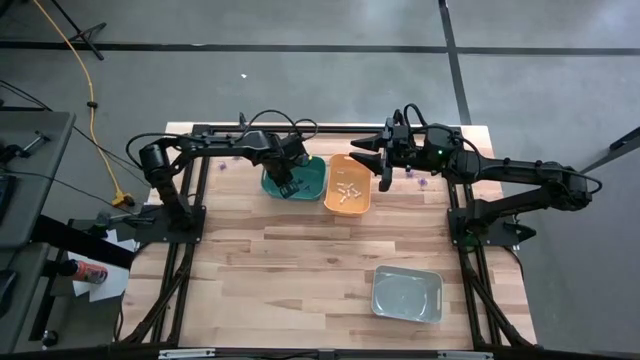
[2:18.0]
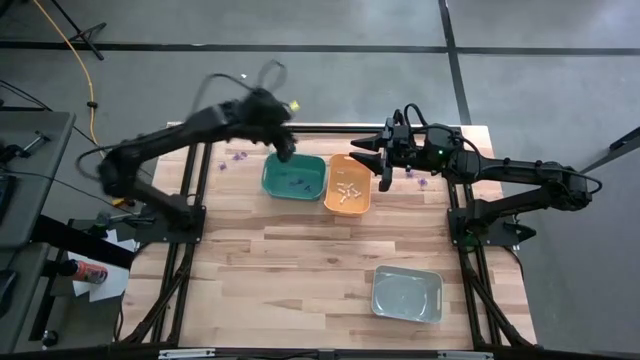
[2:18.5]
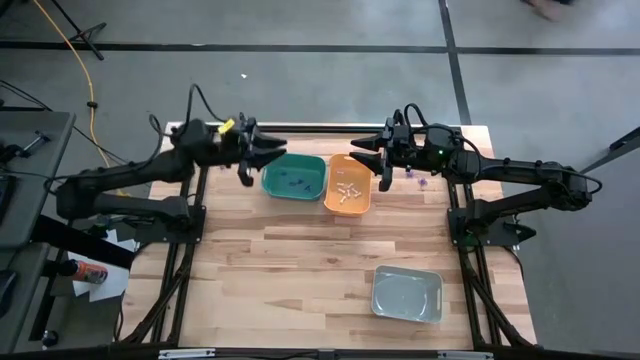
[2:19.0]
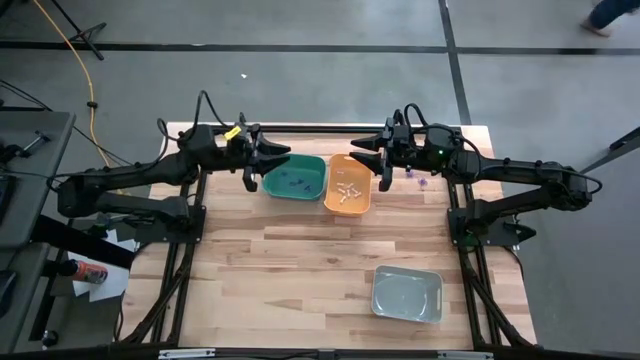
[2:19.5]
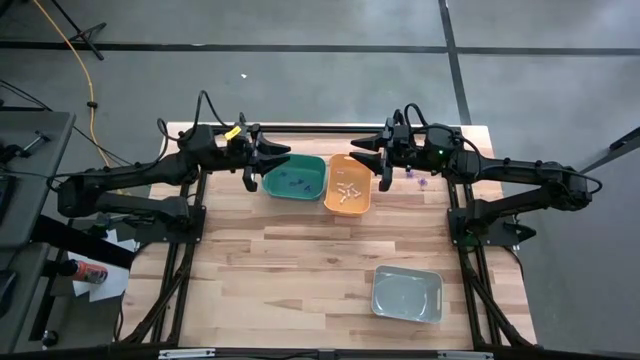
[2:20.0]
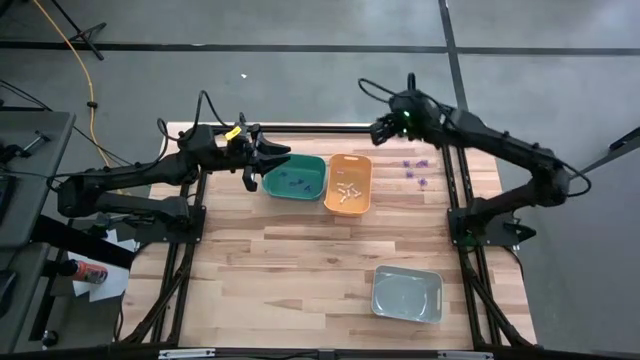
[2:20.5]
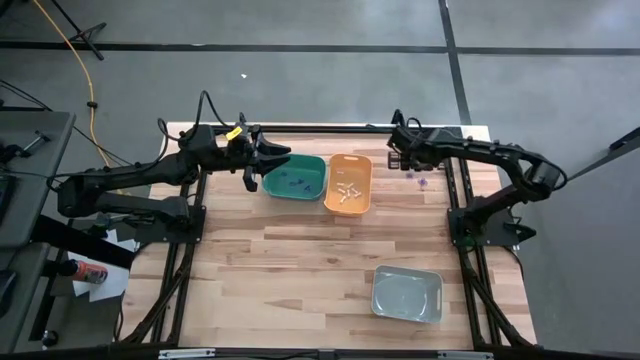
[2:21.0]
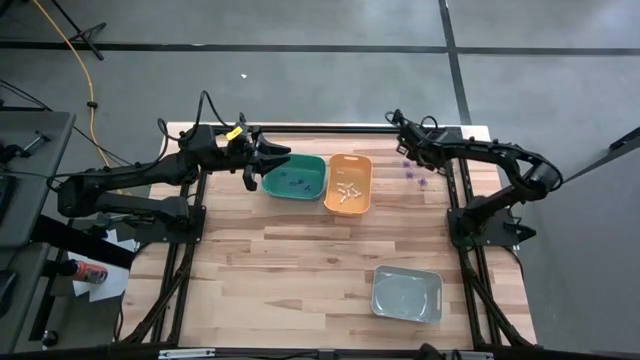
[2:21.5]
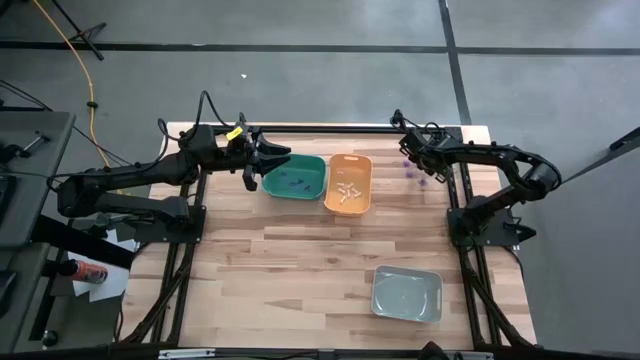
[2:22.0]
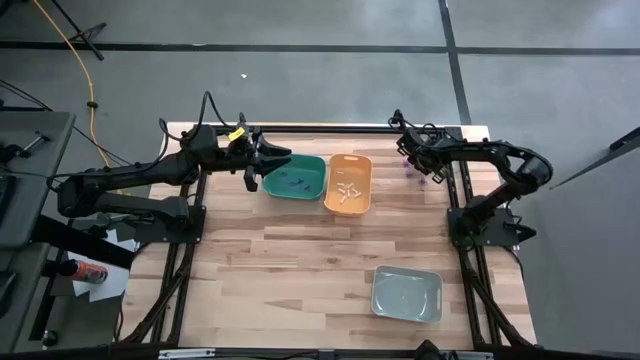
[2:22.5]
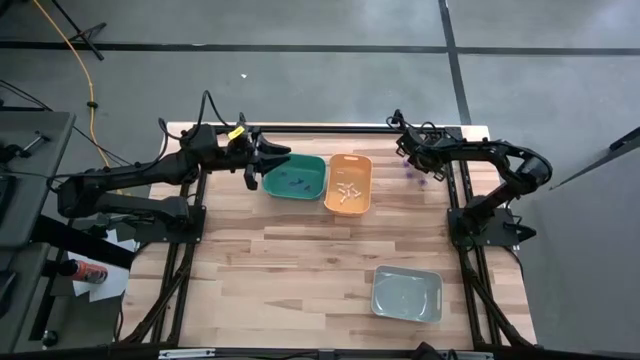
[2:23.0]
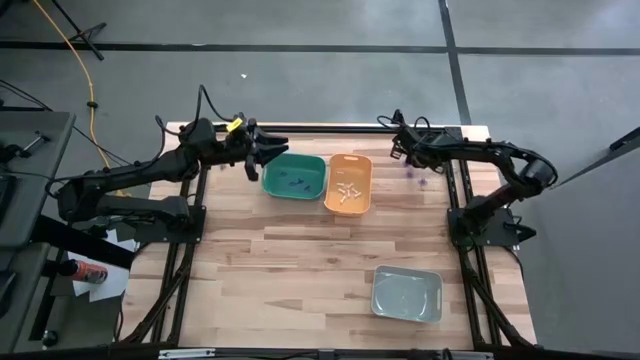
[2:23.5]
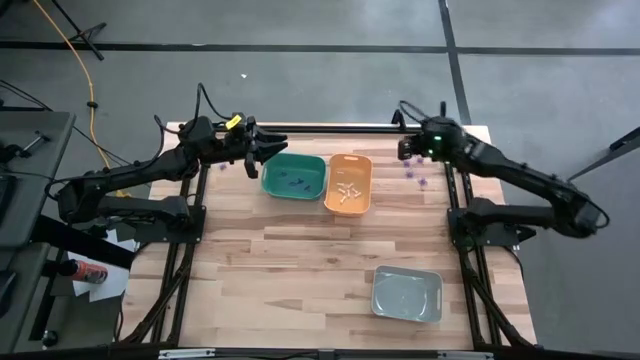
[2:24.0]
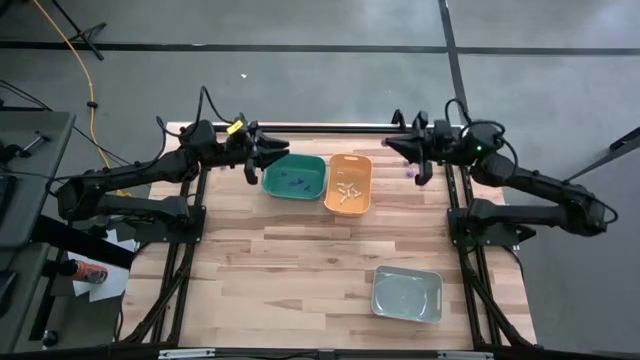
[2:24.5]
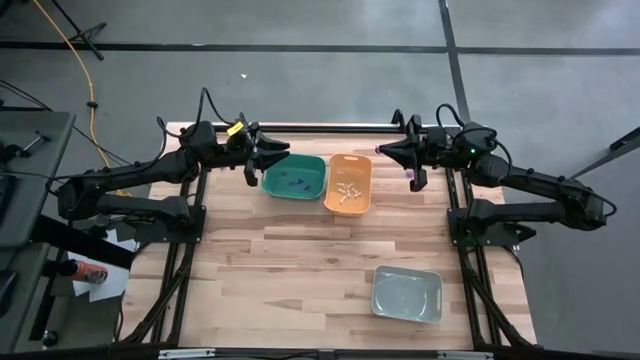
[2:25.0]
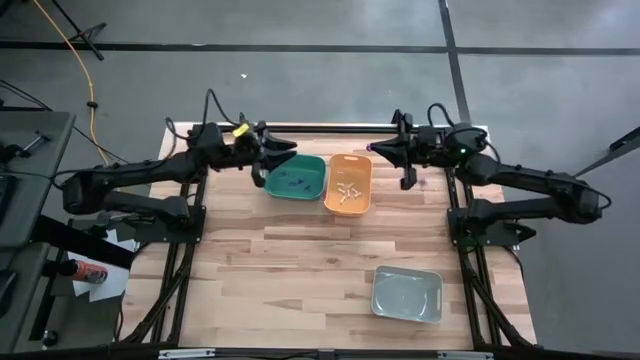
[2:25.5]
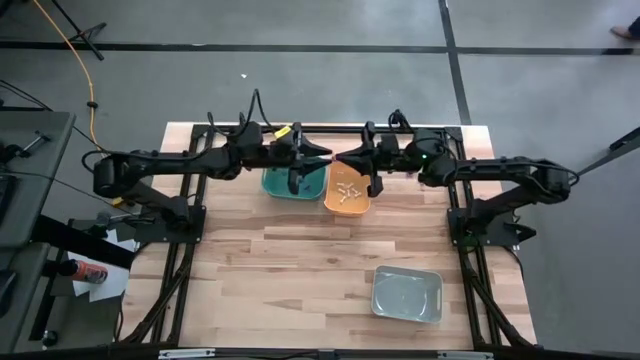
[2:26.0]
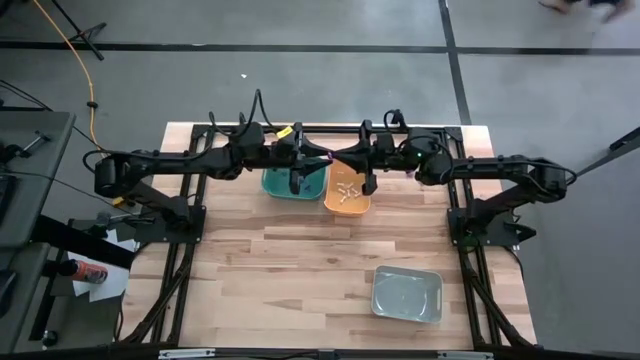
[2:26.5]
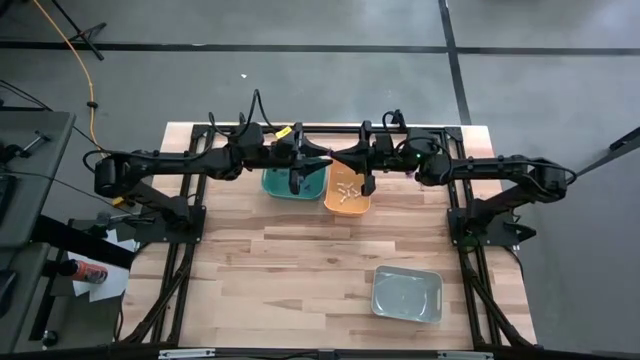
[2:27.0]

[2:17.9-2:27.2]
Task: Sort Halloween decoration
Put the violet witch hut toy into the green bin

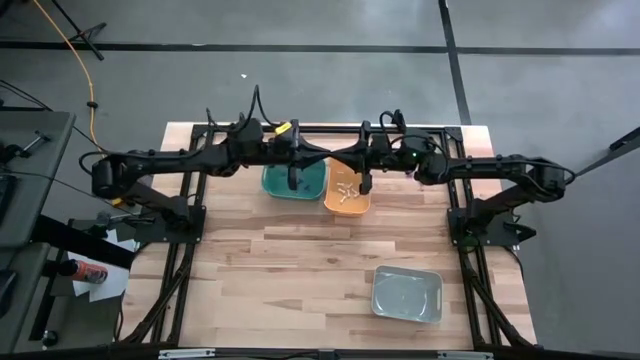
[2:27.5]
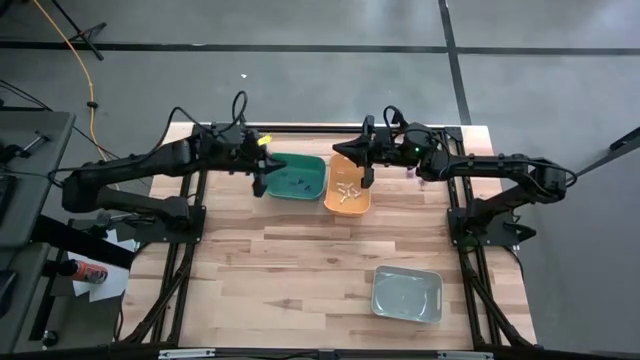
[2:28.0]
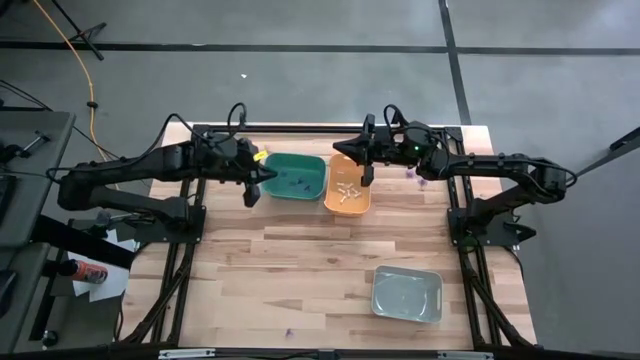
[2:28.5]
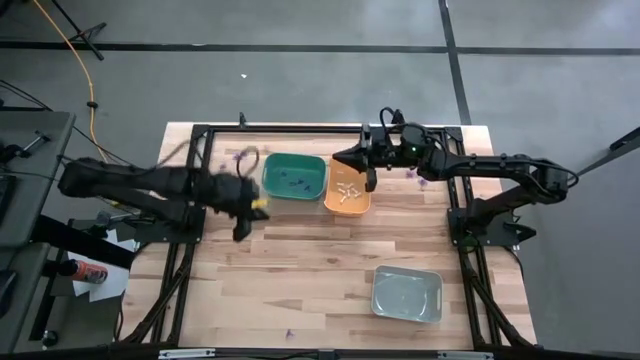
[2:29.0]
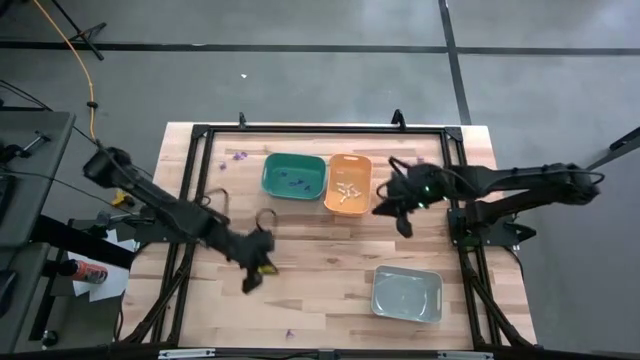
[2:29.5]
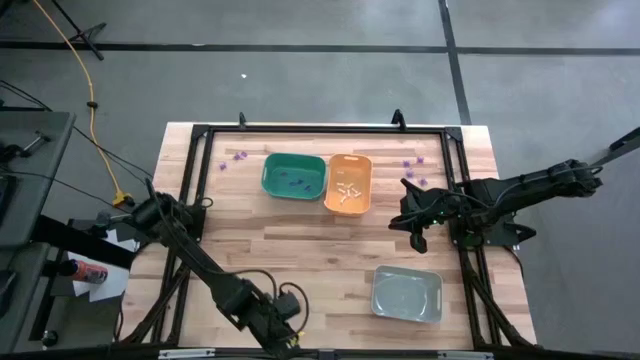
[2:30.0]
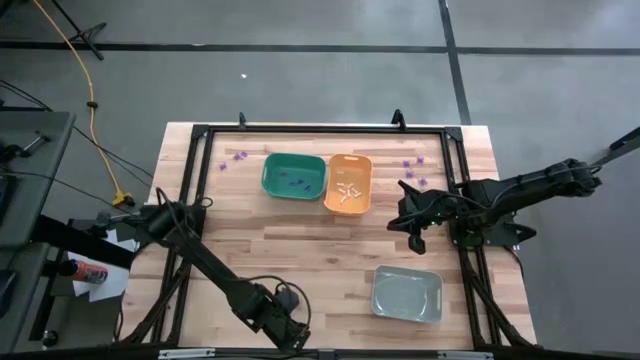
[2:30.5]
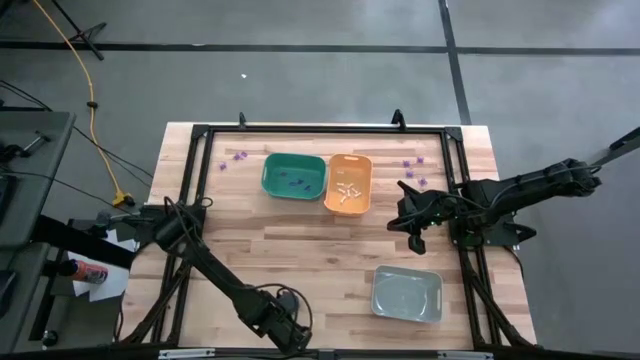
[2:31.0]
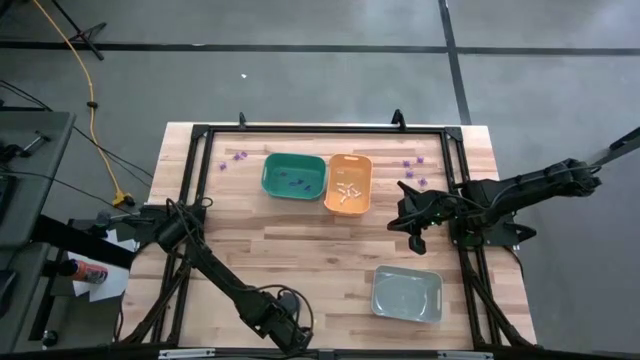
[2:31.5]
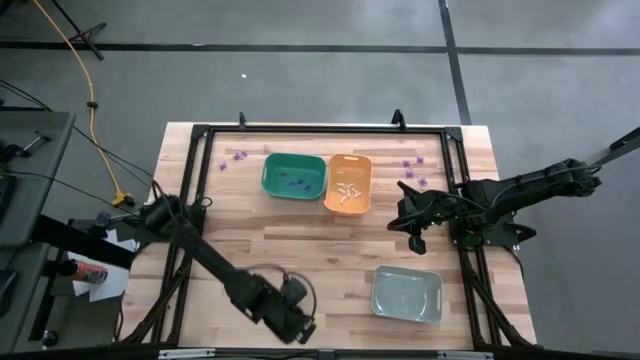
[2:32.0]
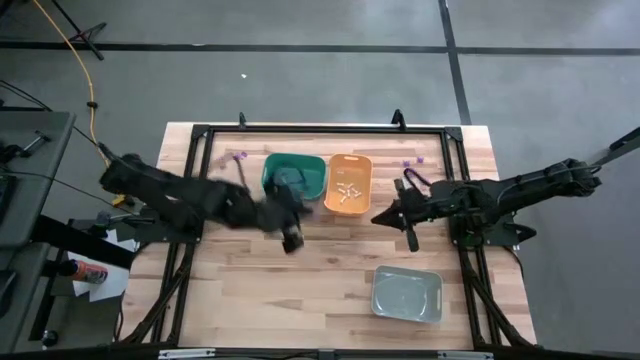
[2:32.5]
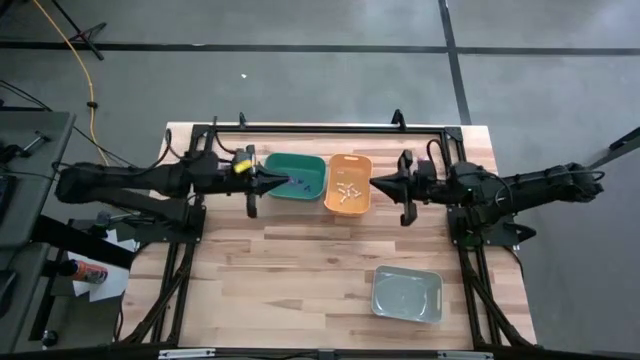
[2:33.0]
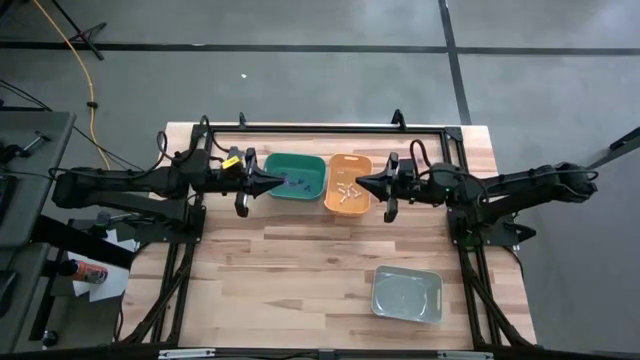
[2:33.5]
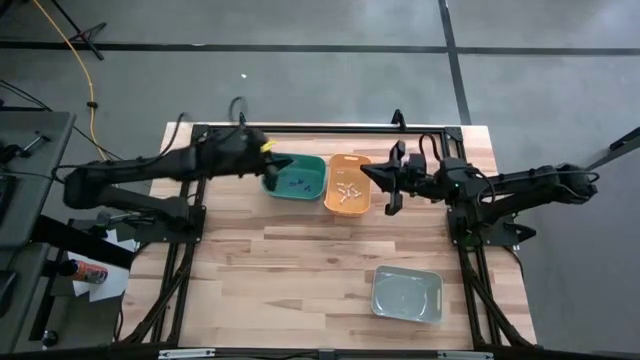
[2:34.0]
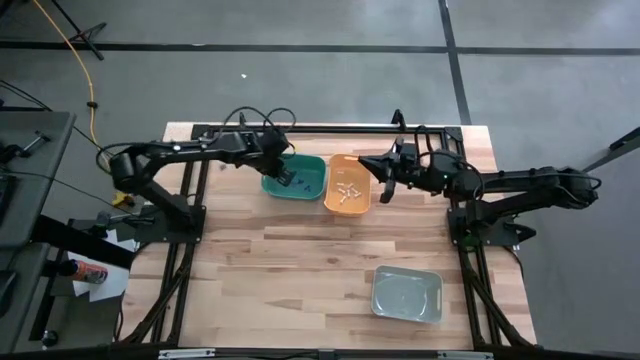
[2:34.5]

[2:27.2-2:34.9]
Put the violet witch hut toy into the green bin

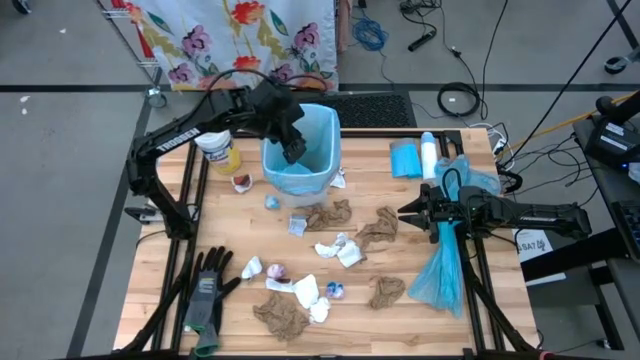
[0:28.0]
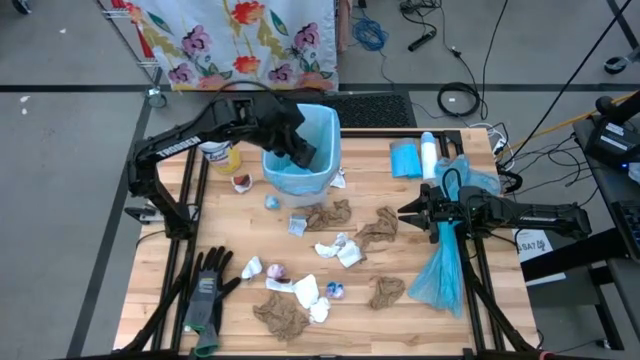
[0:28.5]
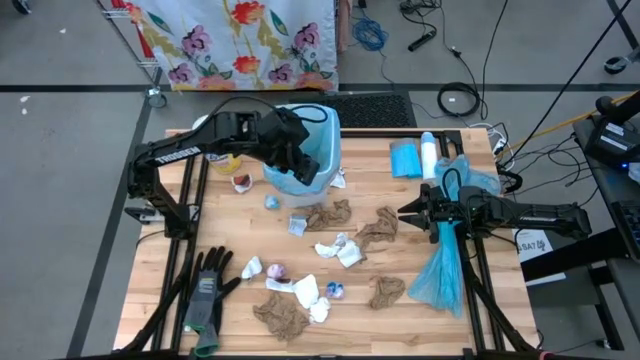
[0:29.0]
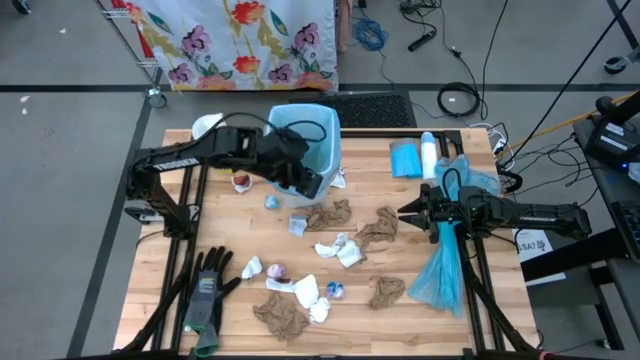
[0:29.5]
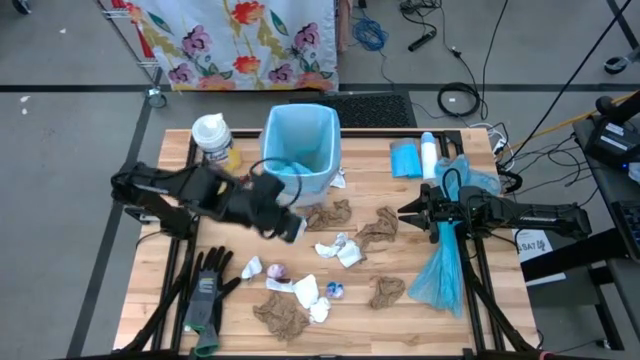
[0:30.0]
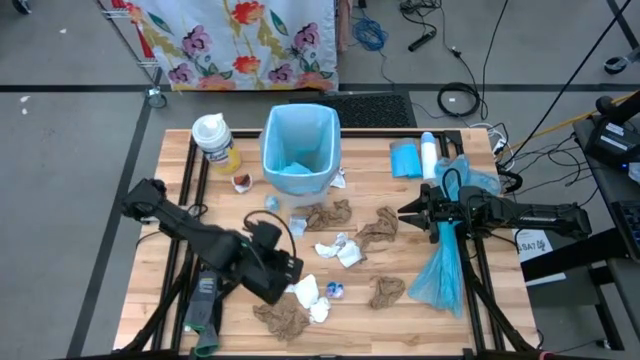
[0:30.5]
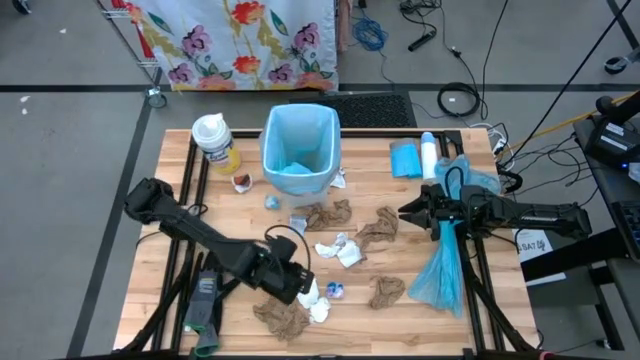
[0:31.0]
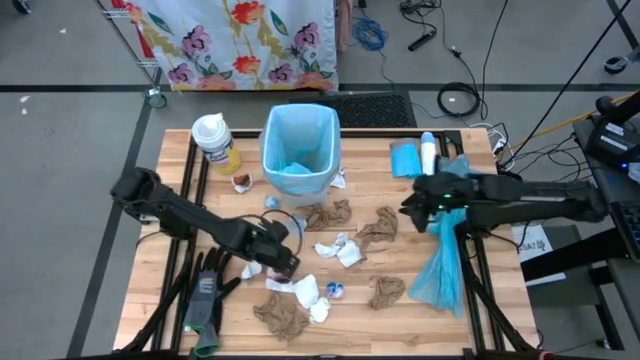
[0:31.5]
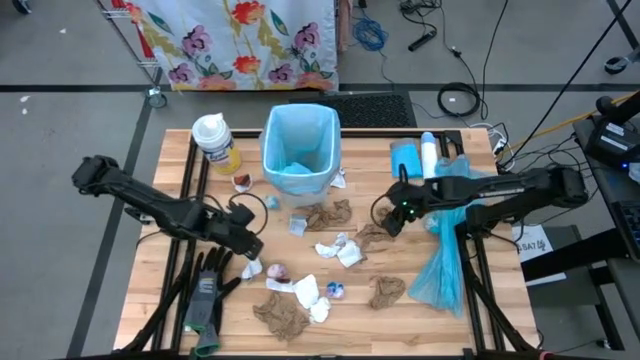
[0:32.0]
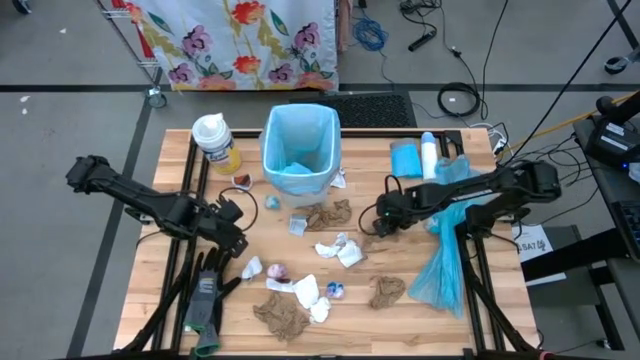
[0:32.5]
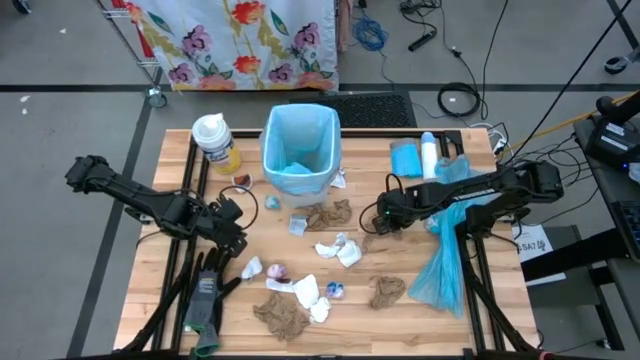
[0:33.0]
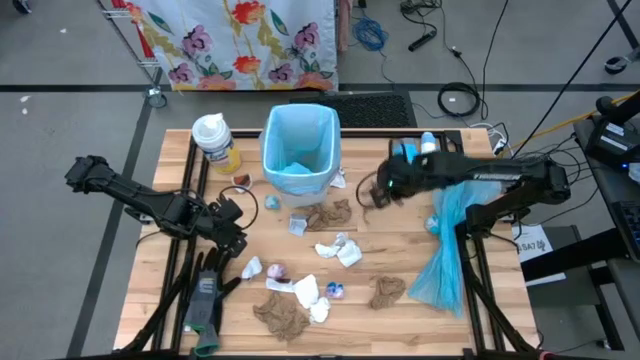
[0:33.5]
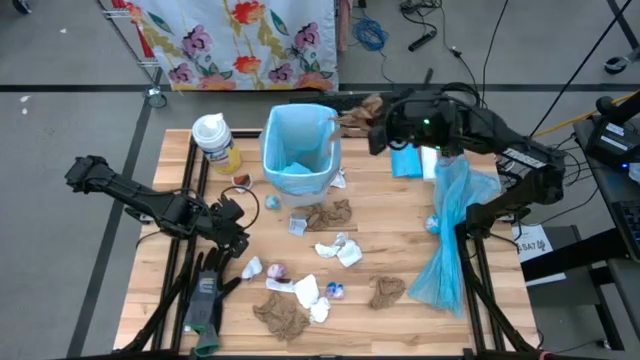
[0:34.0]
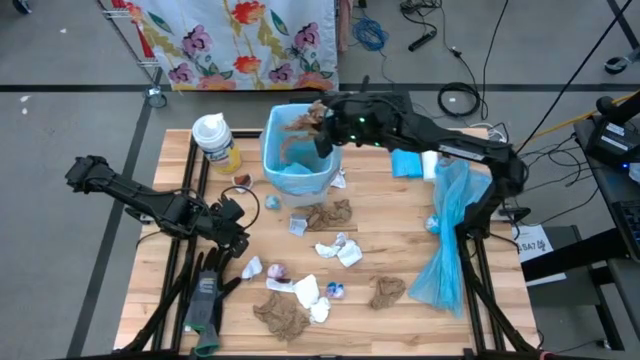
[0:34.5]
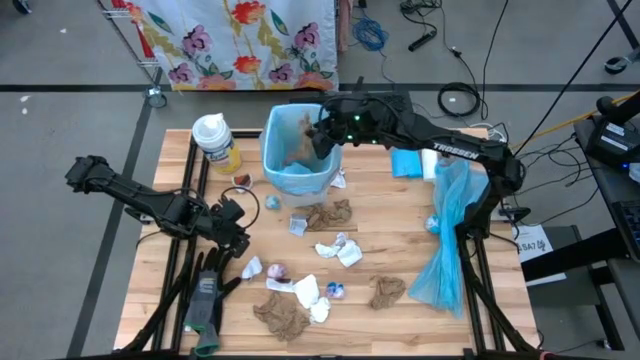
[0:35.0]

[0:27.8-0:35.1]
Task: place trash/remove bag and relplace
Put the brown napkin into the trash bin
